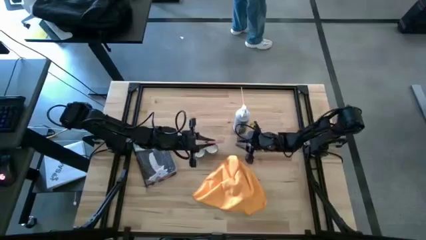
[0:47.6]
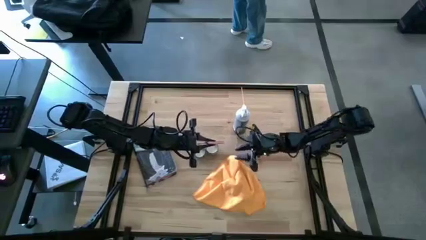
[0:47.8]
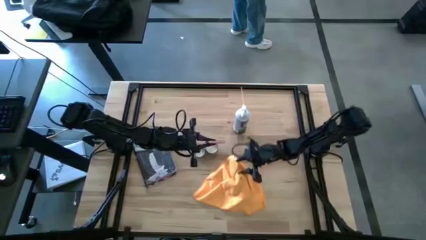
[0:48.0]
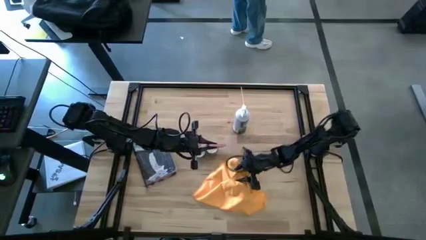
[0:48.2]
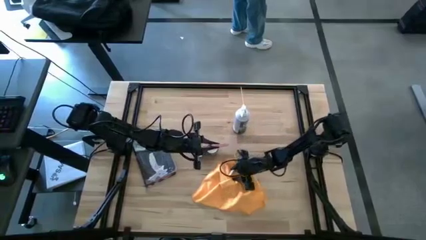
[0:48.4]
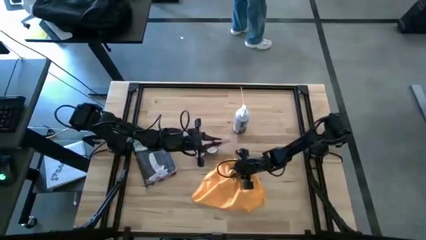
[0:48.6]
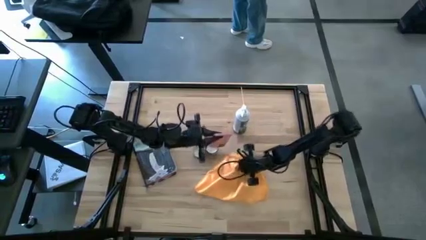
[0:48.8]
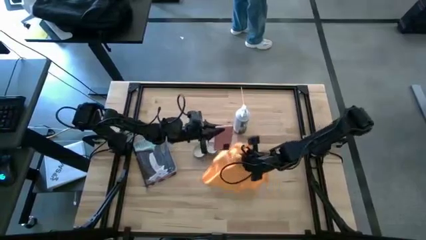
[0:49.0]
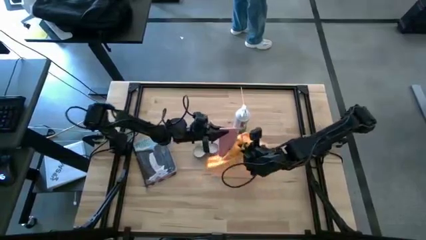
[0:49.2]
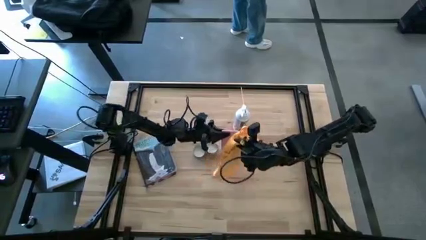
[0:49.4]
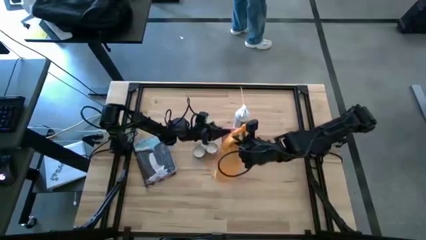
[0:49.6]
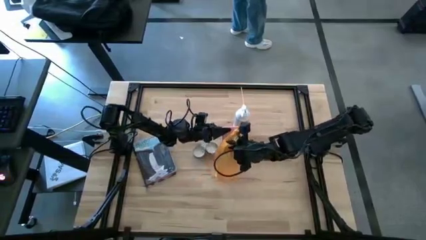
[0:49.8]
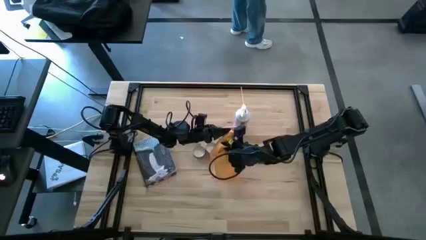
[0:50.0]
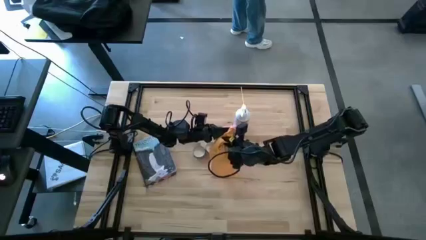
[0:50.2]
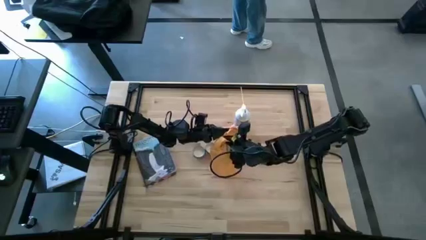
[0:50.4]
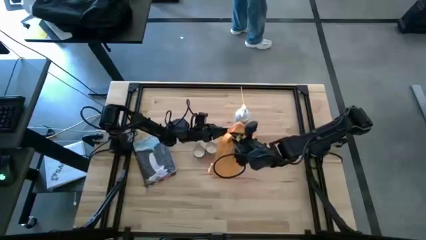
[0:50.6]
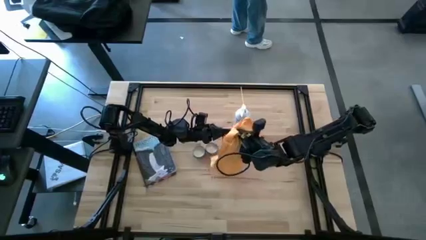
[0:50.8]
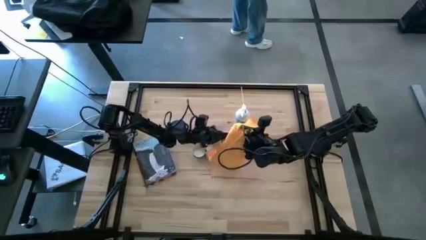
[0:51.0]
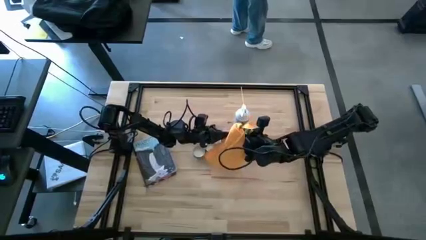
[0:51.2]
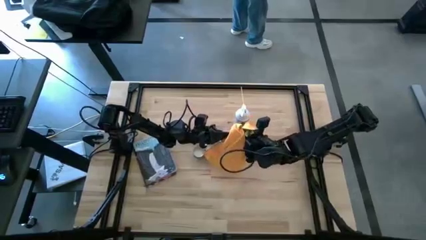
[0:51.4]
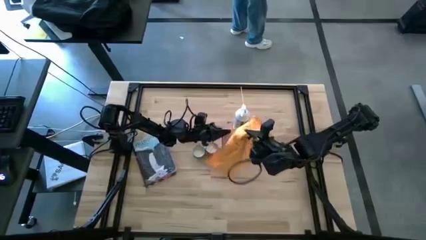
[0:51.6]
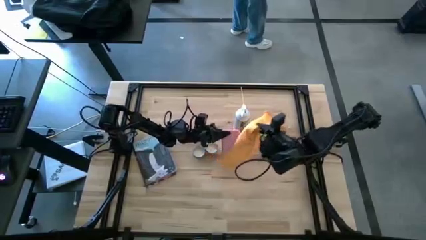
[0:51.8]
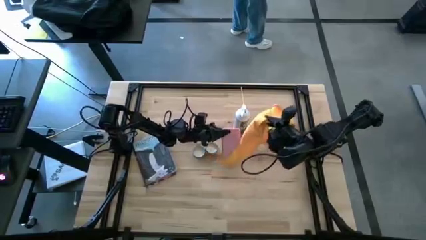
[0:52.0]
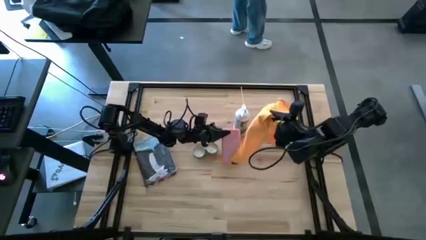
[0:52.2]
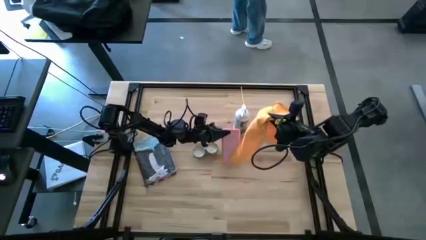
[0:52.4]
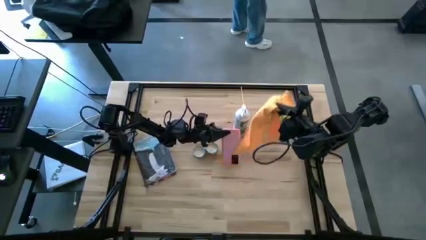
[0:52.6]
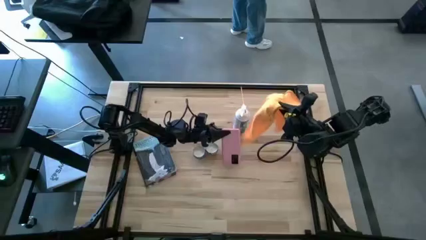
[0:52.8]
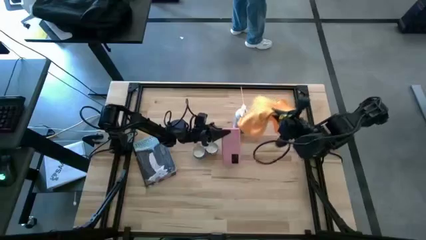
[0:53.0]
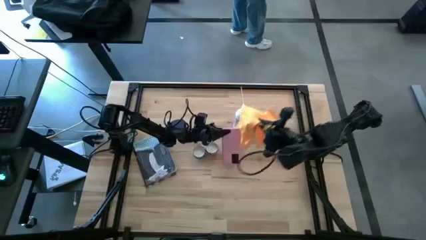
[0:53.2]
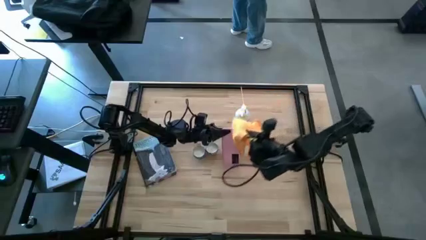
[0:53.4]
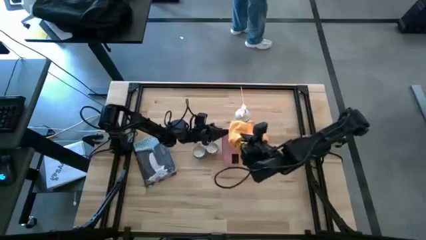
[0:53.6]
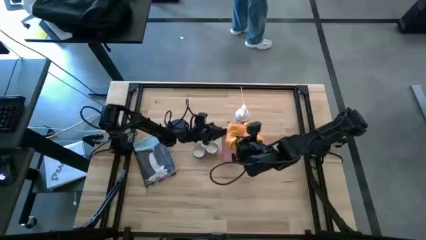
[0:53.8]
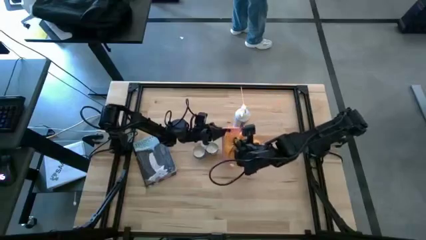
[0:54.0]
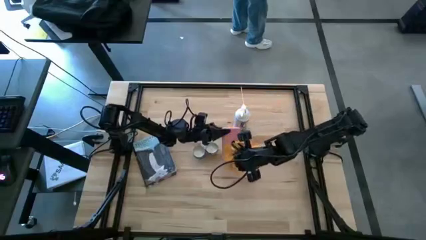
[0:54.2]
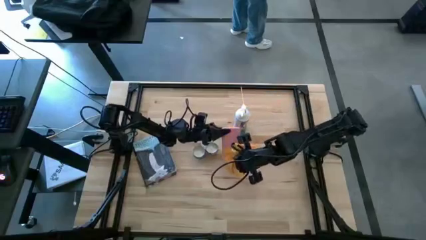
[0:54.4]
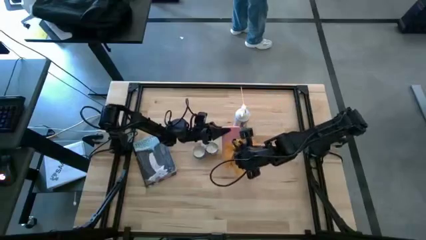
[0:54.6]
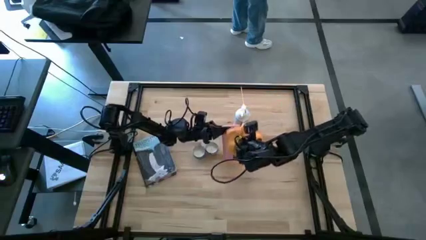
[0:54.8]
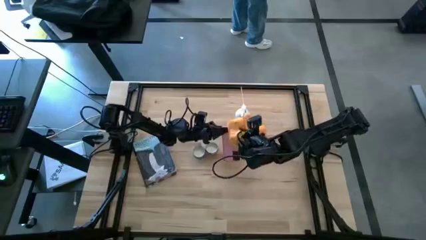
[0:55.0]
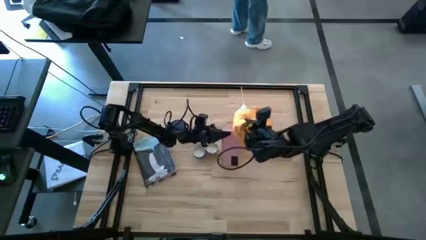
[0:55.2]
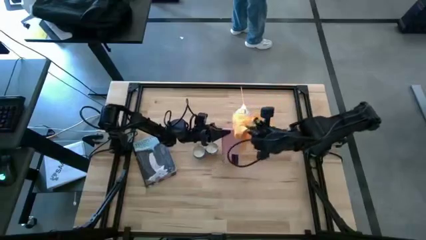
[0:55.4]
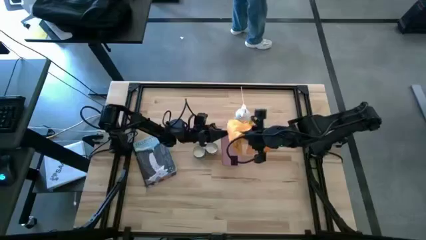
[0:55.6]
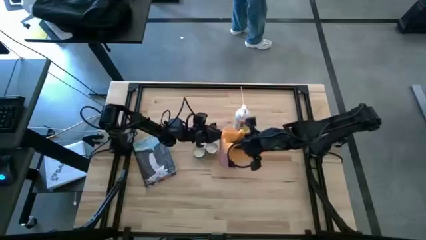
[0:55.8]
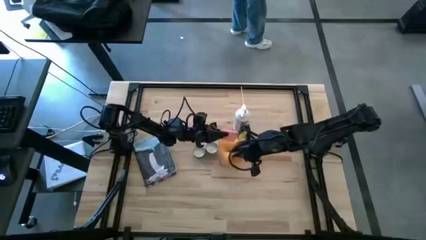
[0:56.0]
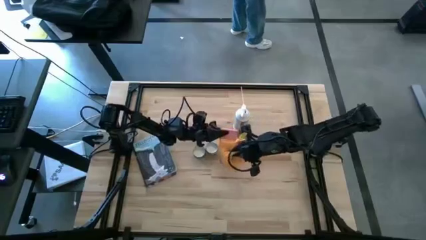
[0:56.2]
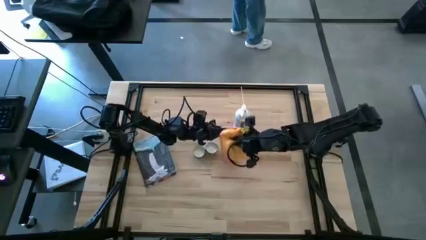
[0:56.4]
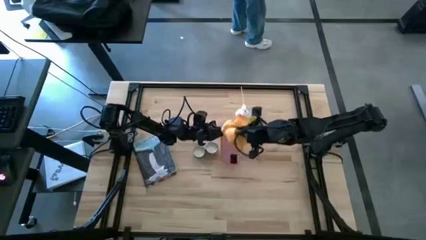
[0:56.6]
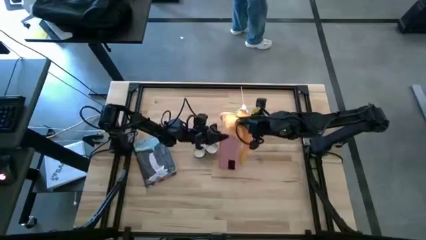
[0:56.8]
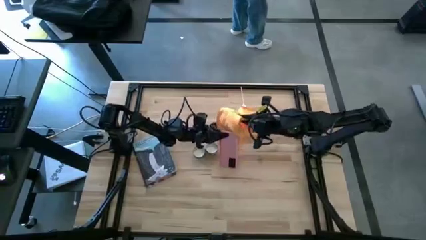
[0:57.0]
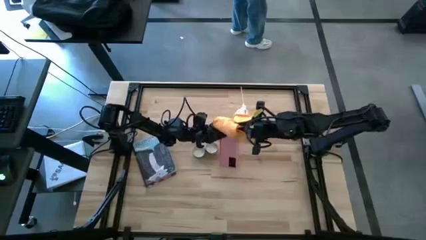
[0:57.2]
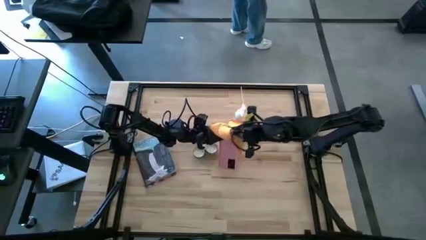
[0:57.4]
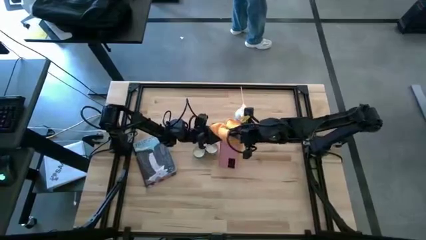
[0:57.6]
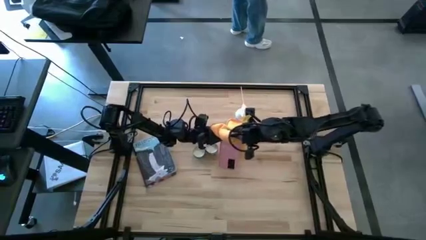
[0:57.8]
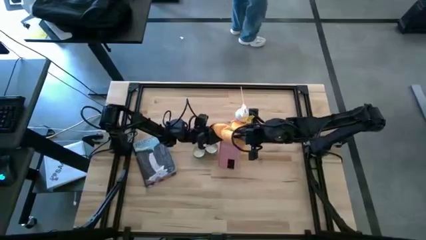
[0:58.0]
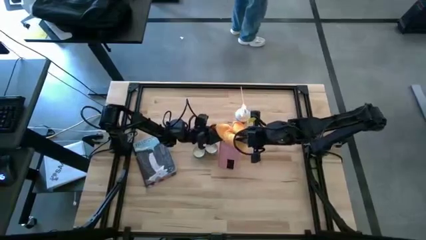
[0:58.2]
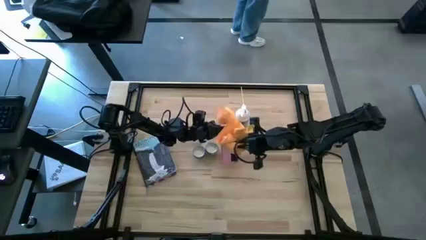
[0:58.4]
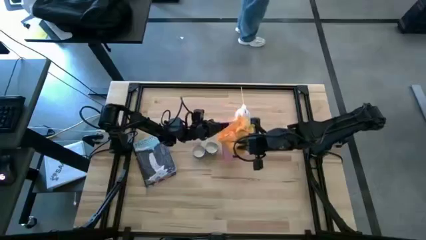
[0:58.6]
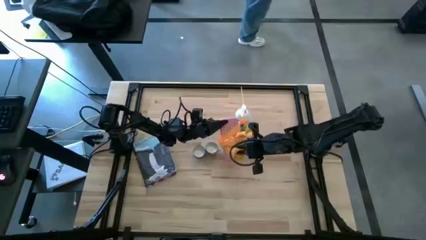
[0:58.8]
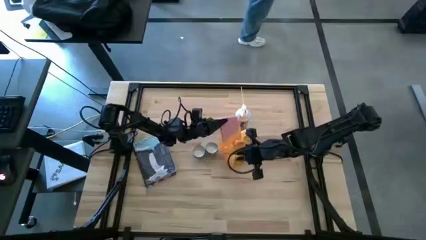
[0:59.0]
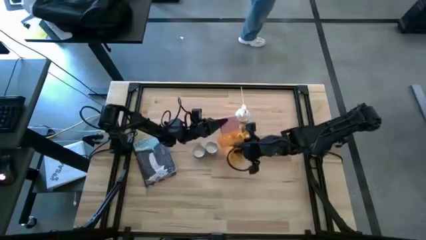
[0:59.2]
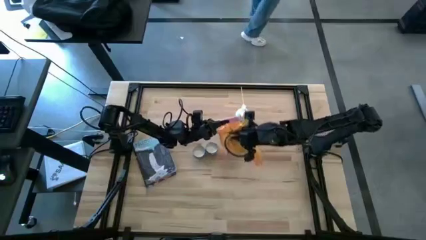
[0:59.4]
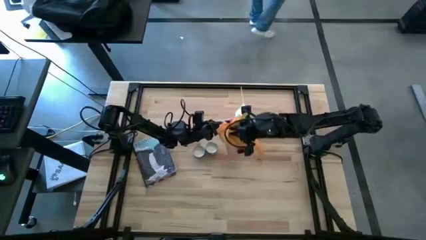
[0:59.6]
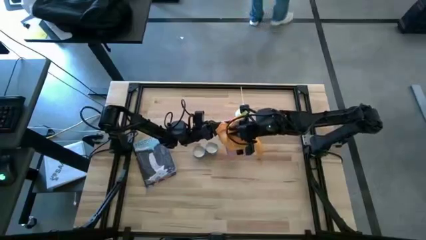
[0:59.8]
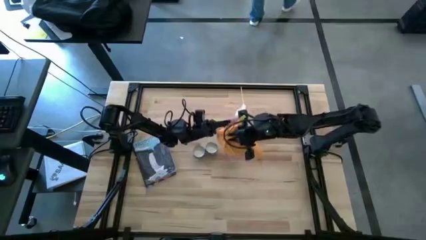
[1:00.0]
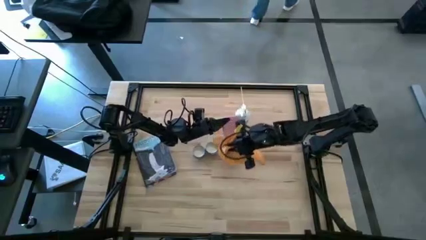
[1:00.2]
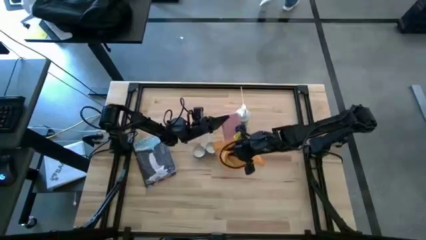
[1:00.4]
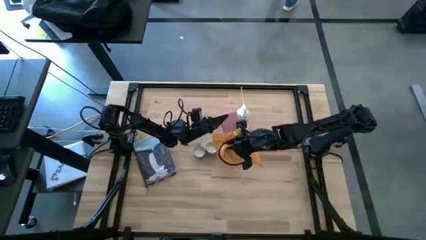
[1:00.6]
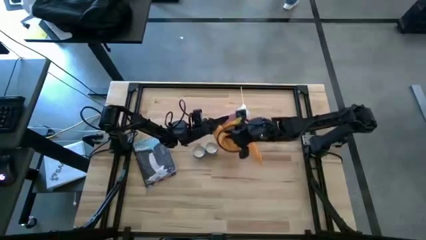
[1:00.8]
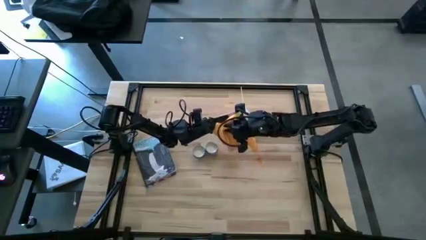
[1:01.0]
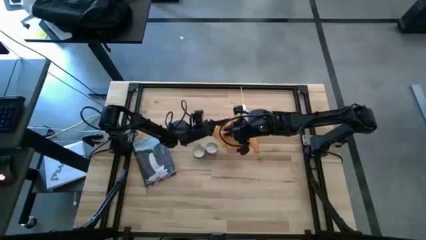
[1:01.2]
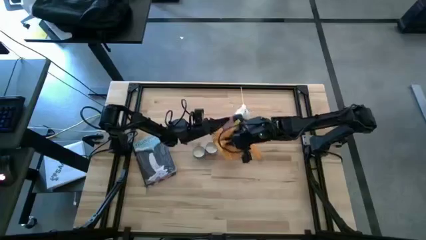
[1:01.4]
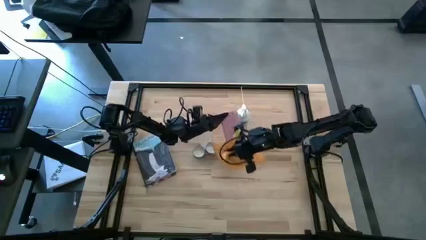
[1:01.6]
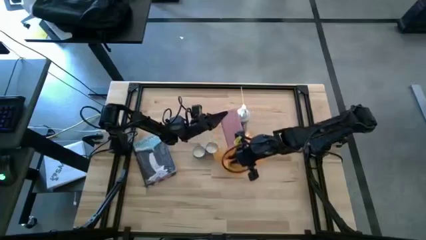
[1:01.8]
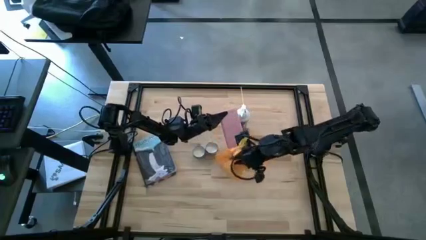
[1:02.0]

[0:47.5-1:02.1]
Task: Apply microfiber cloth
Wipe the cellphone with the microfiber cloth
